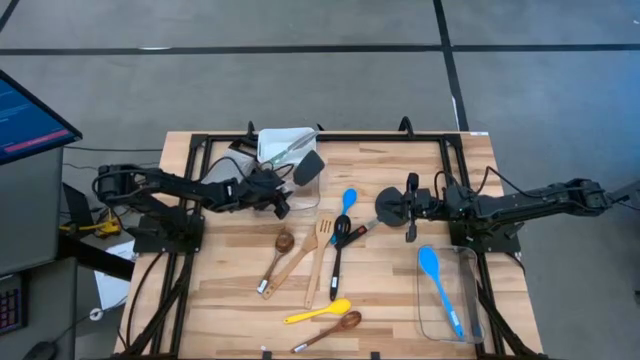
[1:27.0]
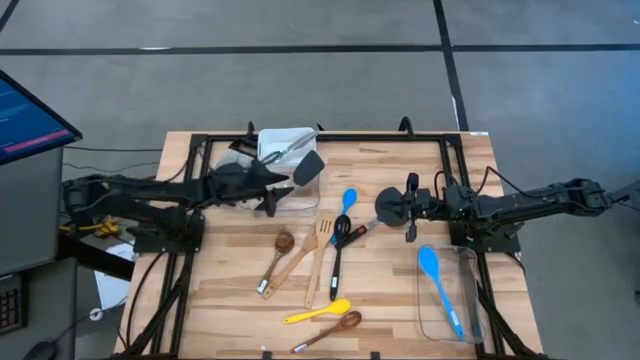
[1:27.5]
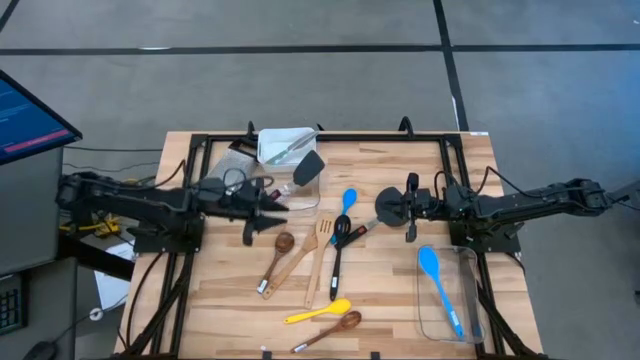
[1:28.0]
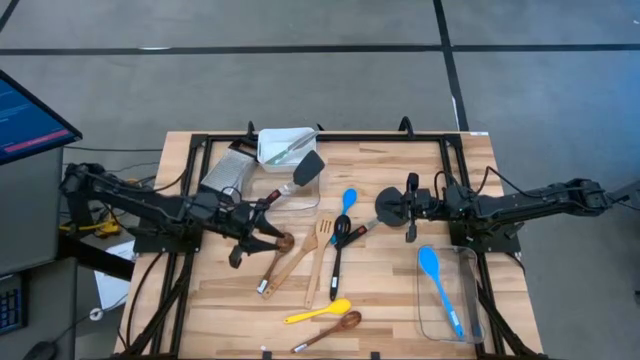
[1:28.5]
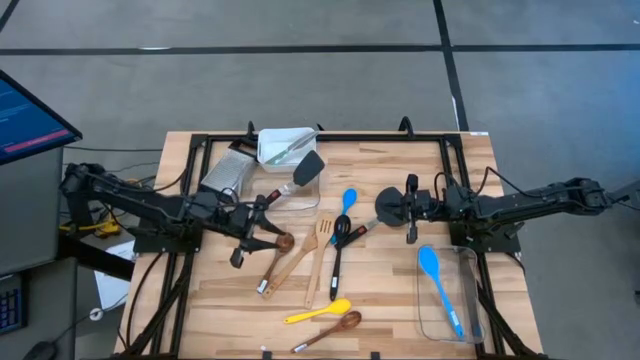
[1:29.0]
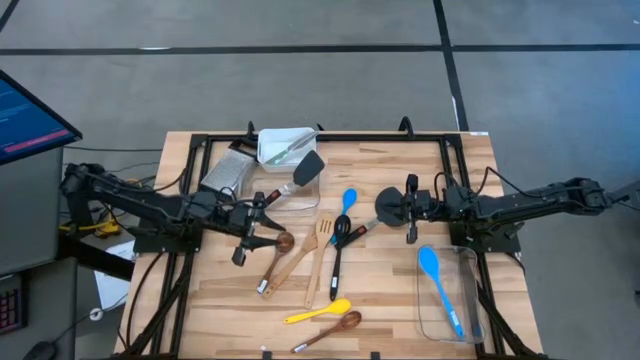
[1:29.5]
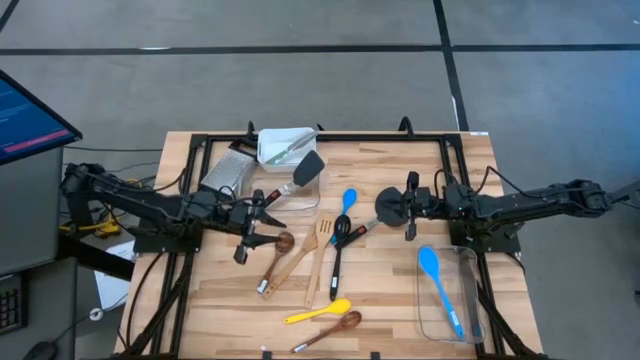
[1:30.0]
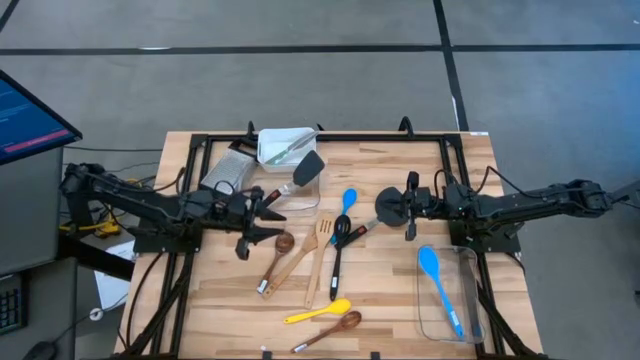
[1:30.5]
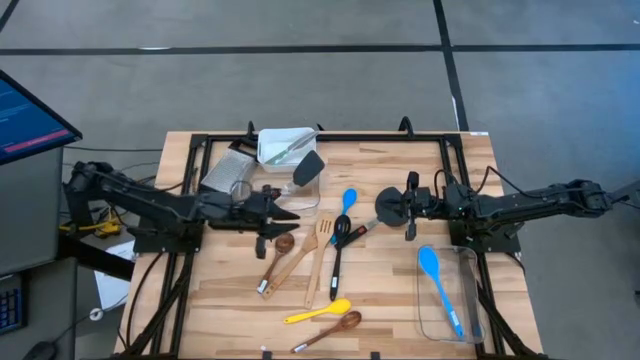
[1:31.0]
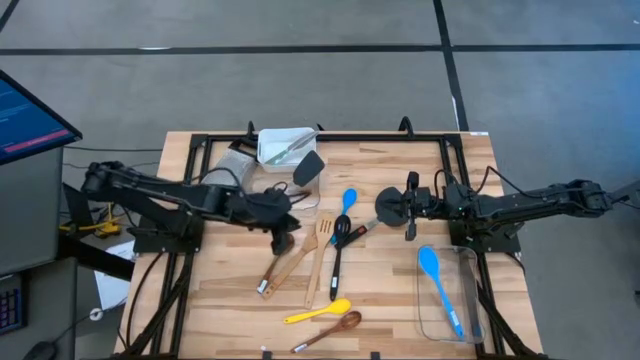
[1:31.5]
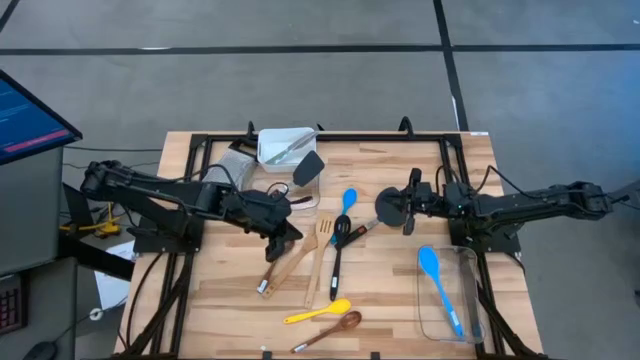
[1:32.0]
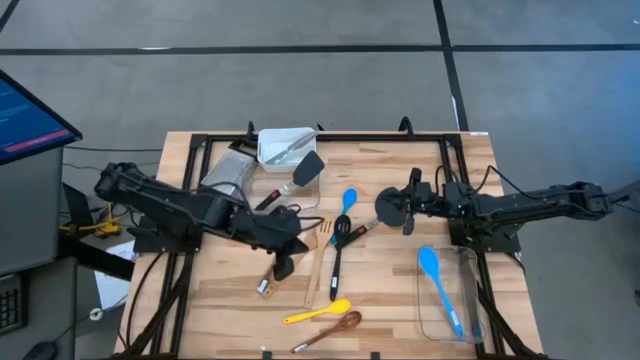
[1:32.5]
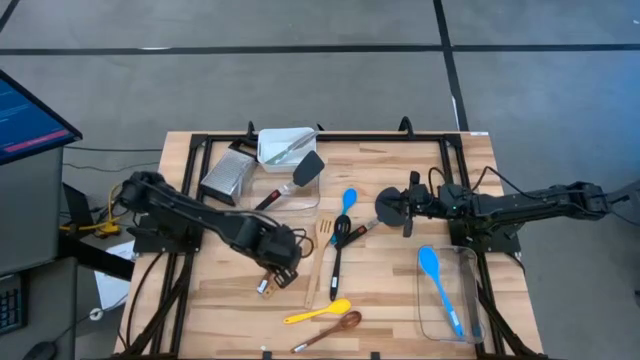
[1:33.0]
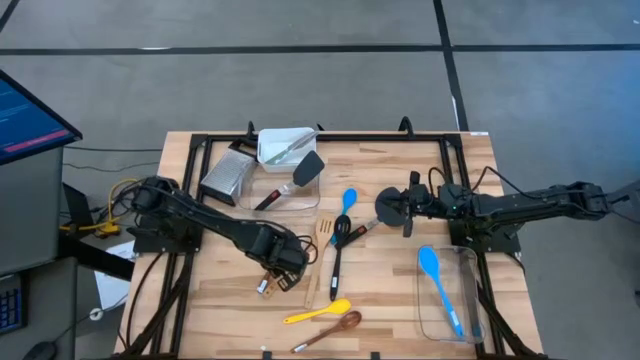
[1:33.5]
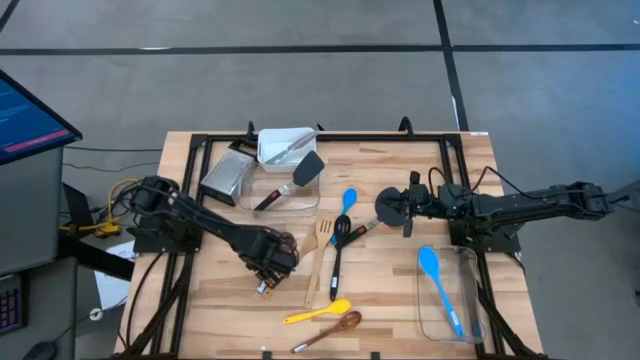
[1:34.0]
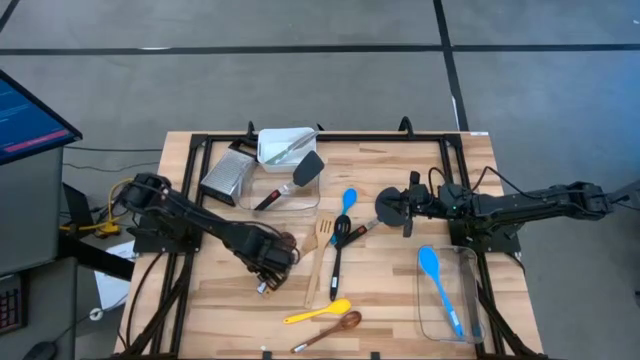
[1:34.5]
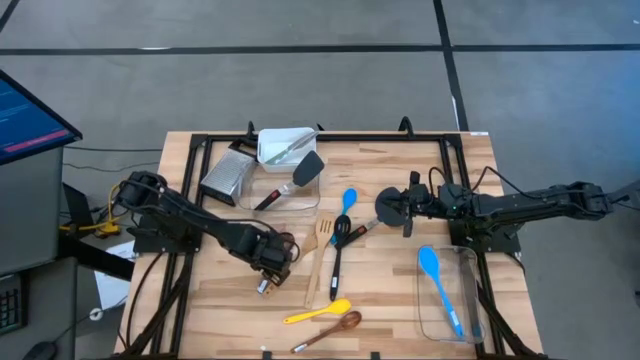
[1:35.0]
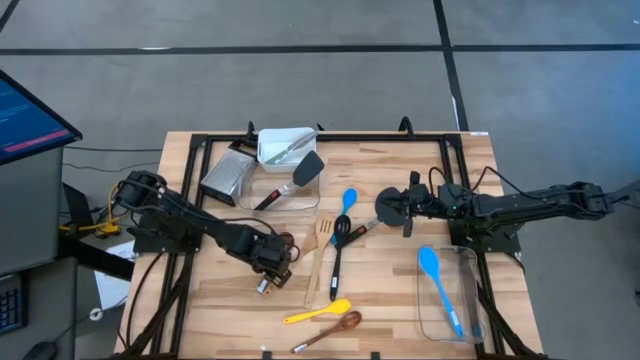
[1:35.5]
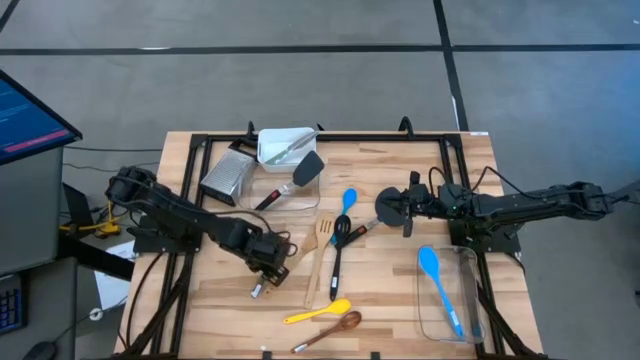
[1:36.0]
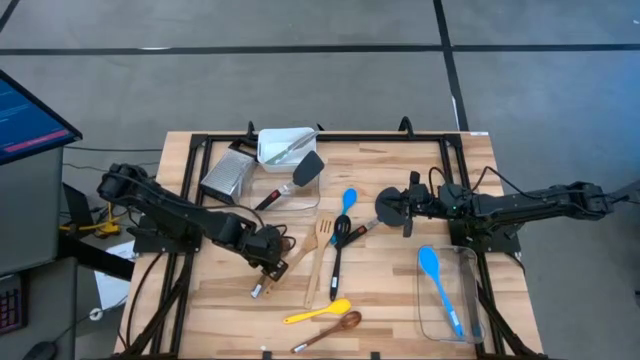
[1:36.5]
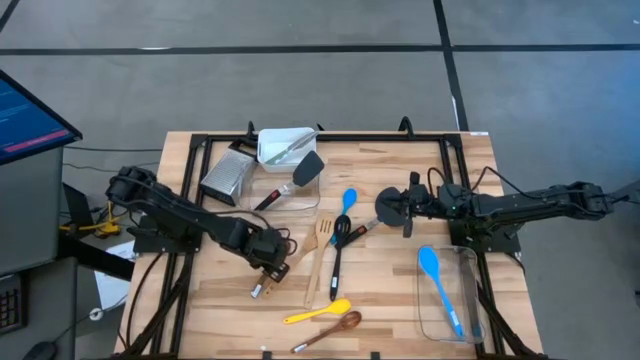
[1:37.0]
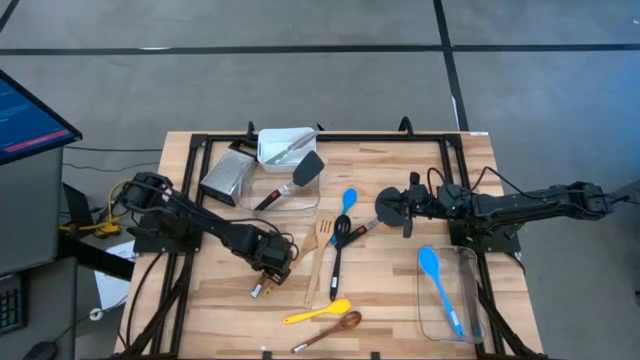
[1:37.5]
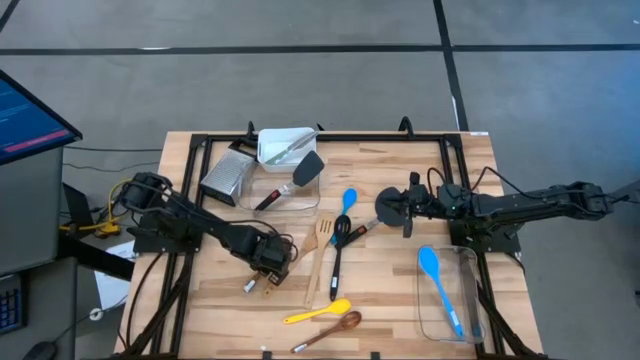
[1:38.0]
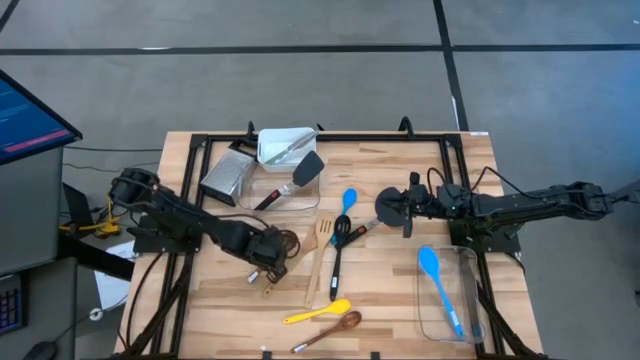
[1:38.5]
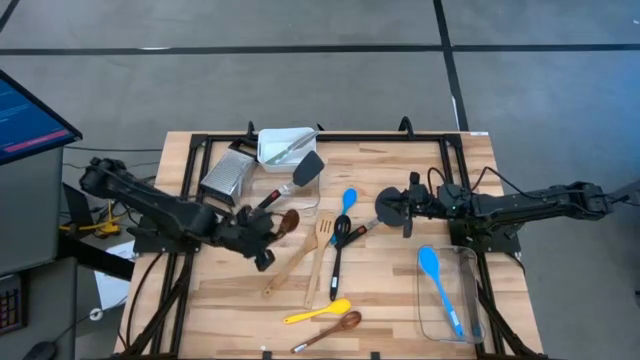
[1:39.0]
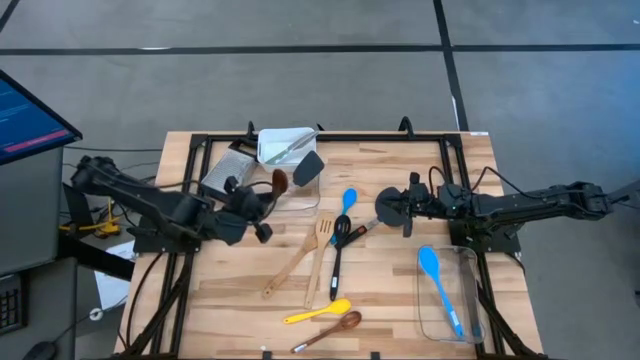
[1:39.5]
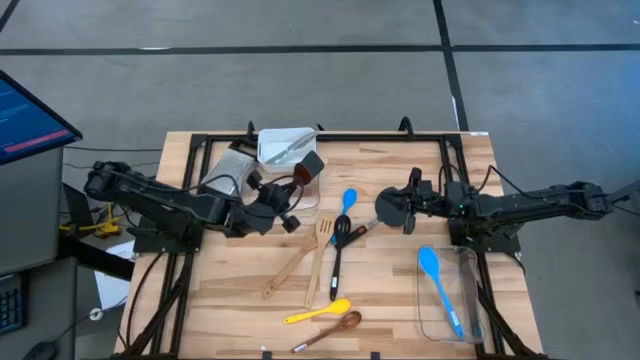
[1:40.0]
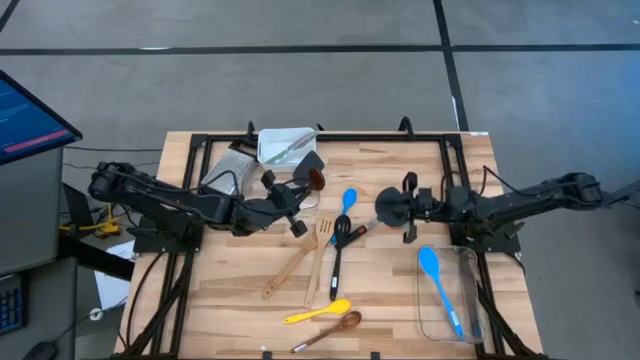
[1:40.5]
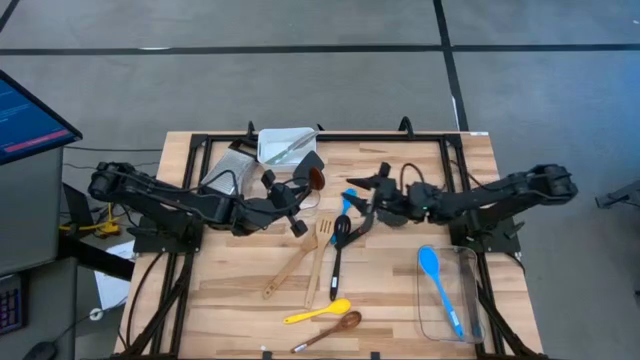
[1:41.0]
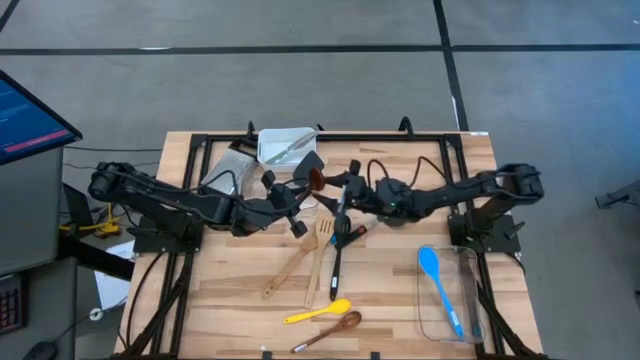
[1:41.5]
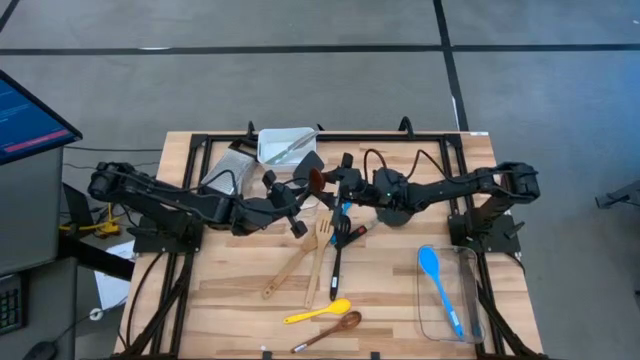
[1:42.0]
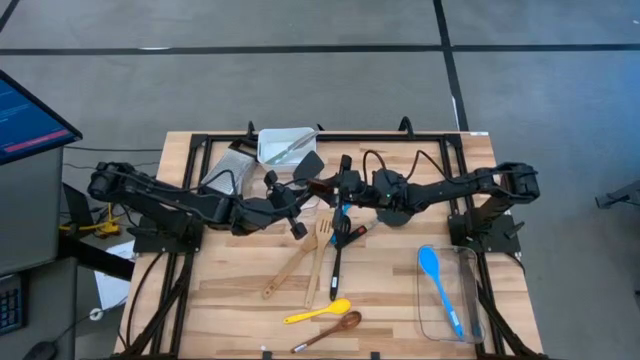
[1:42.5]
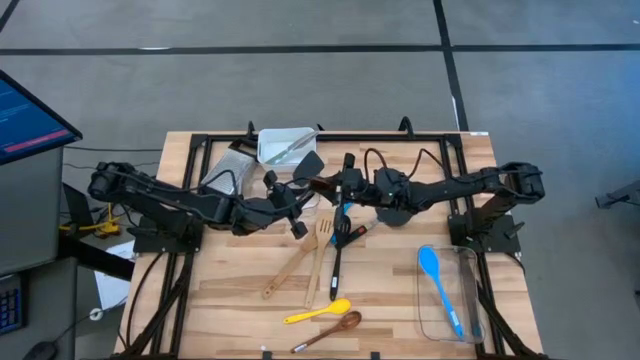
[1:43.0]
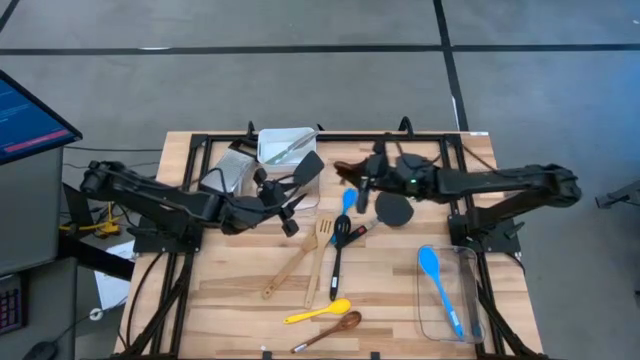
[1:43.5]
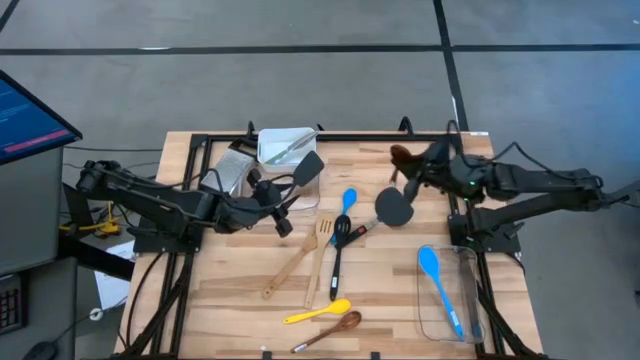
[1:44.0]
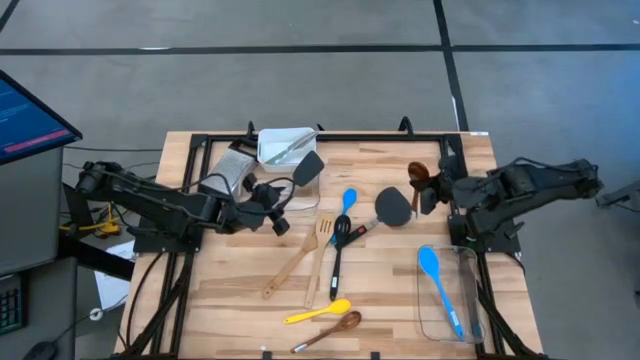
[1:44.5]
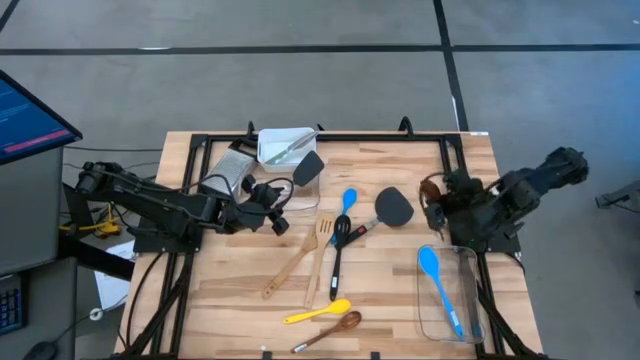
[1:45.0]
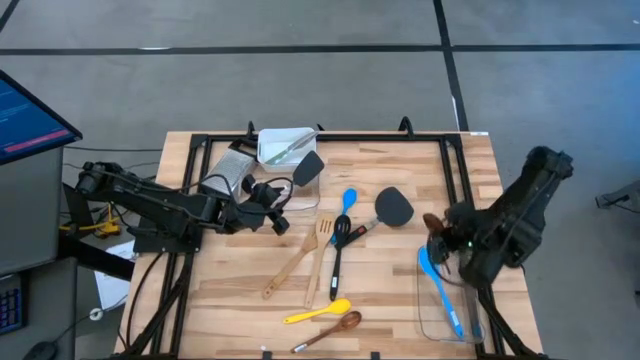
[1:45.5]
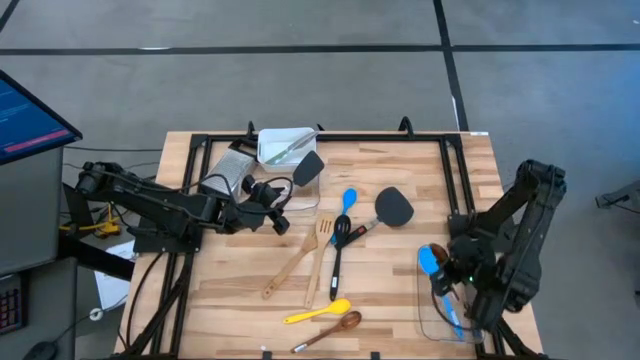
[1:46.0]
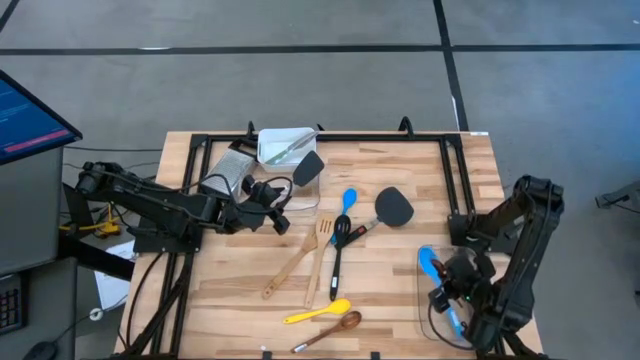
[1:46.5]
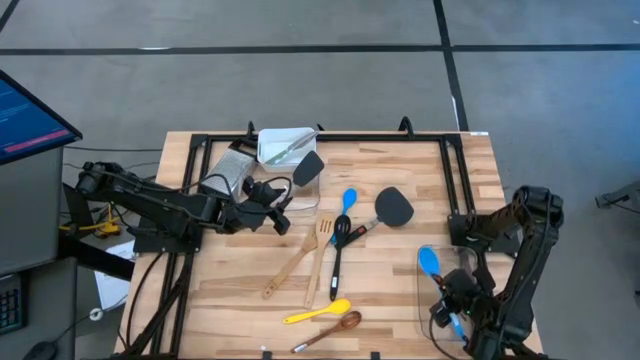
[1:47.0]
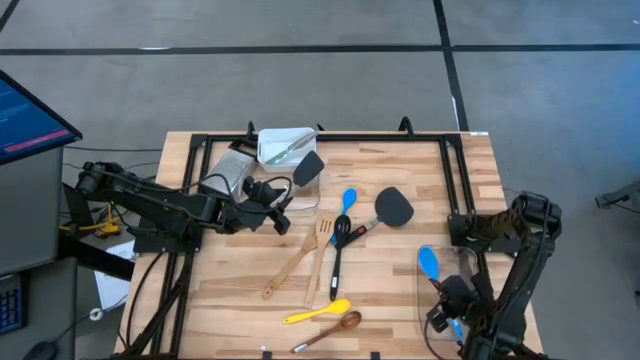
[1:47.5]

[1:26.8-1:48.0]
Task: Pick & Place Kitchen Items
Put the top wooden spoon into the bottom transparent bin

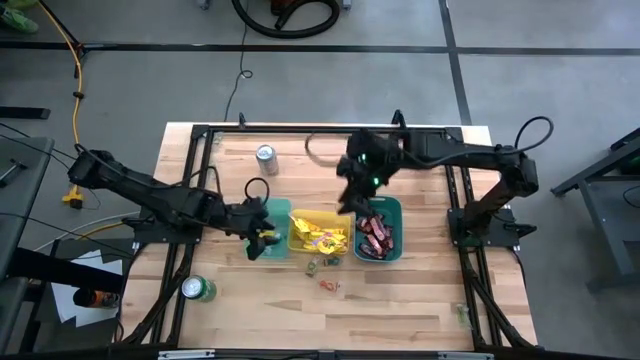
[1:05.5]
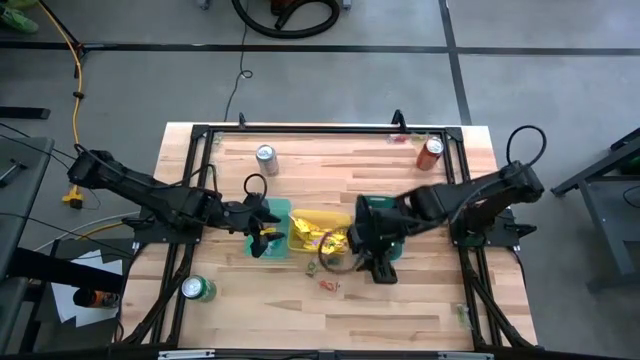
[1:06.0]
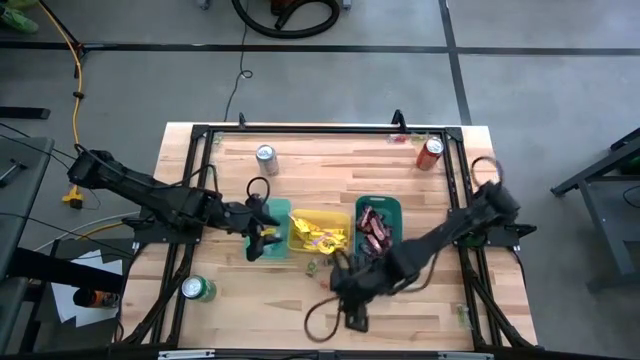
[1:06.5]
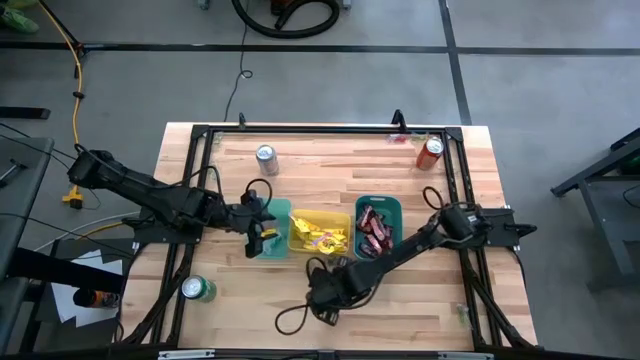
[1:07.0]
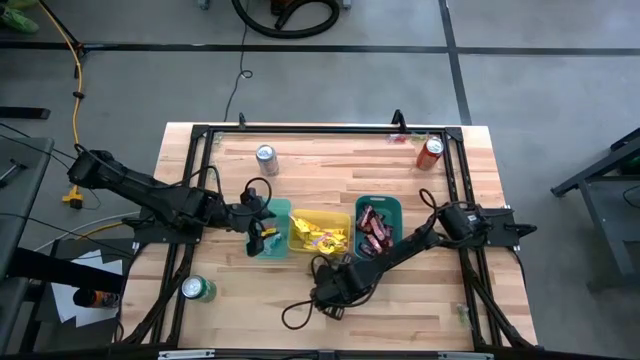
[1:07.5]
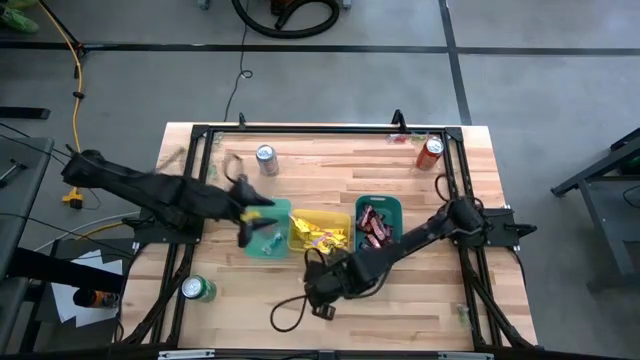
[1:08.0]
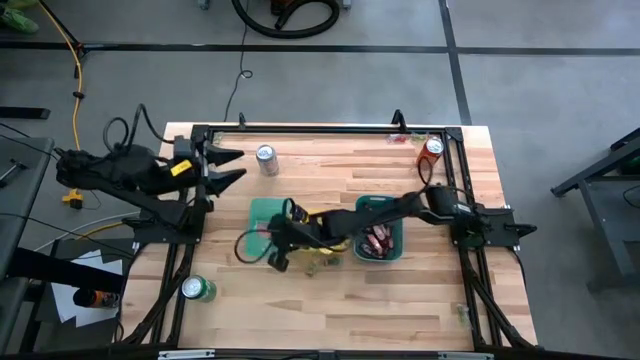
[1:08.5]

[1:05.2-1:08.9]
Task: Sort candy
Put the orange gummy into the green bin
